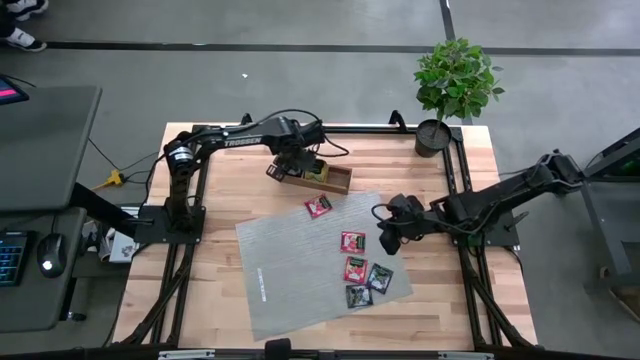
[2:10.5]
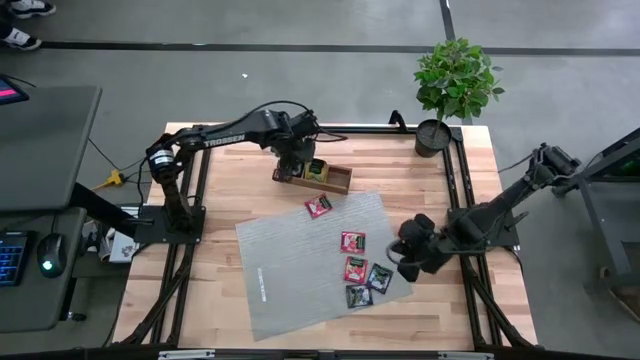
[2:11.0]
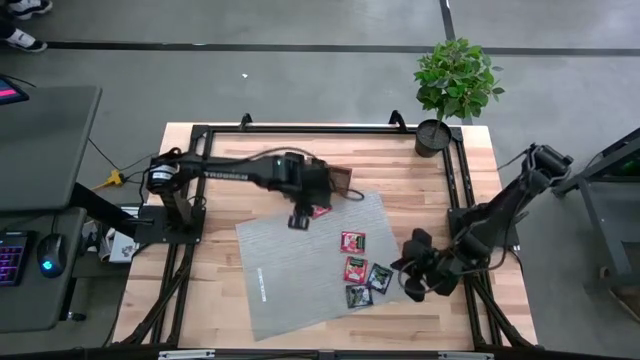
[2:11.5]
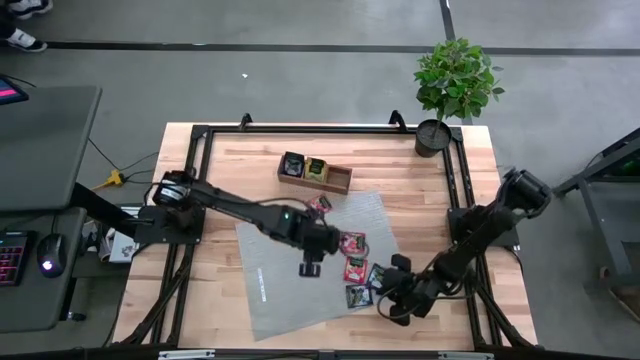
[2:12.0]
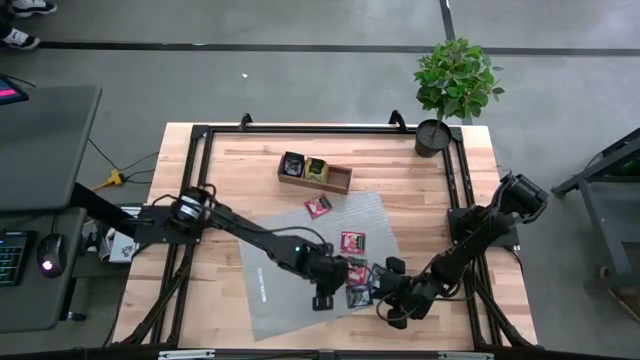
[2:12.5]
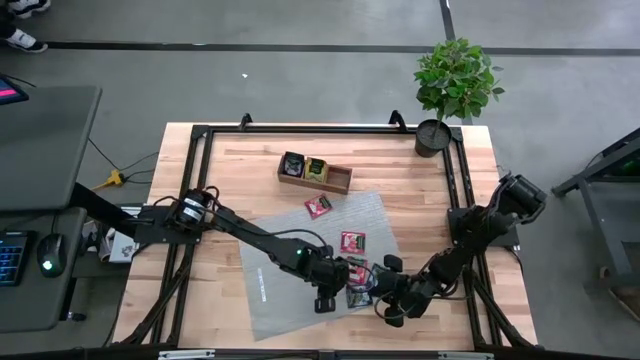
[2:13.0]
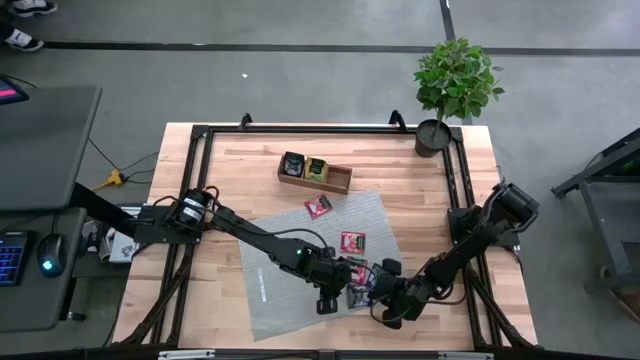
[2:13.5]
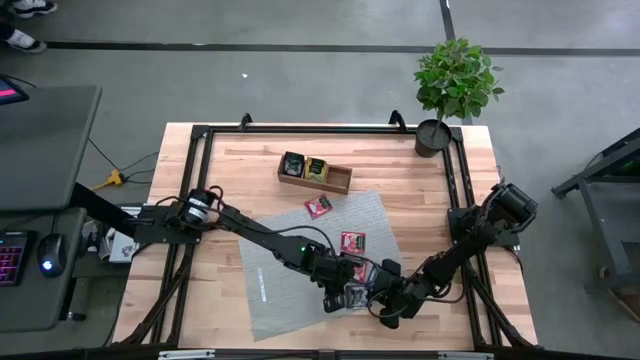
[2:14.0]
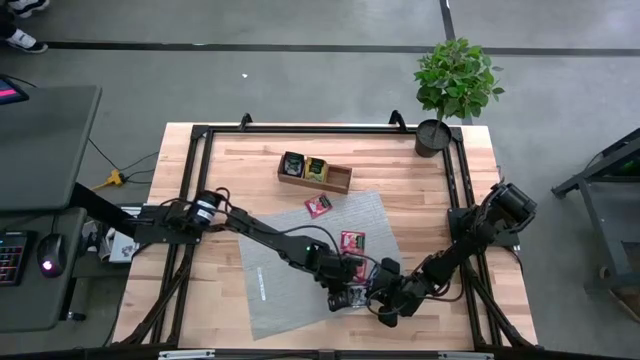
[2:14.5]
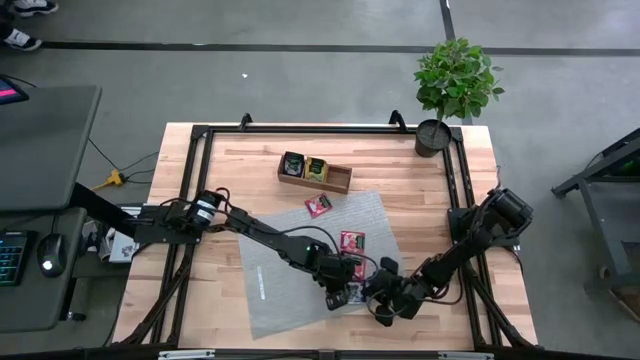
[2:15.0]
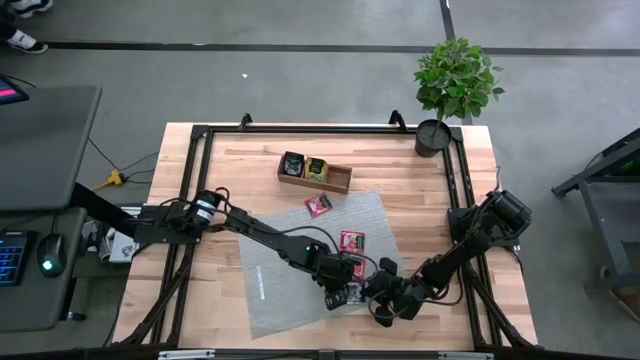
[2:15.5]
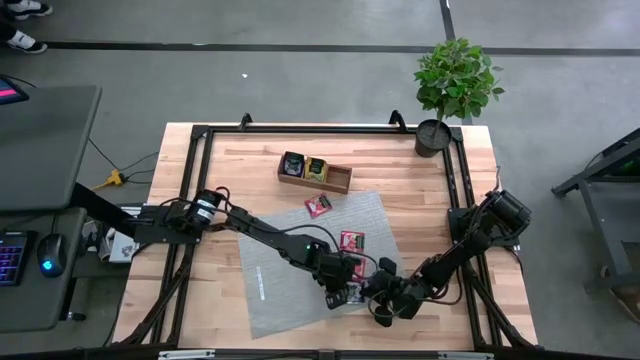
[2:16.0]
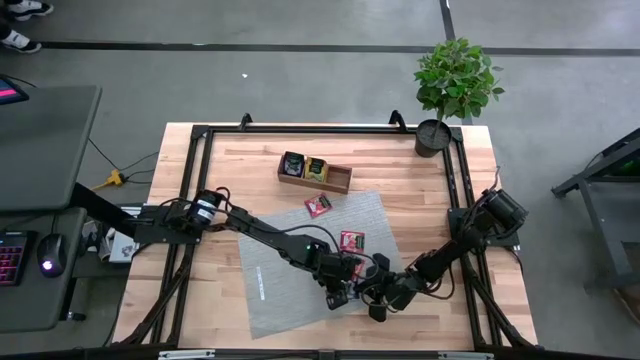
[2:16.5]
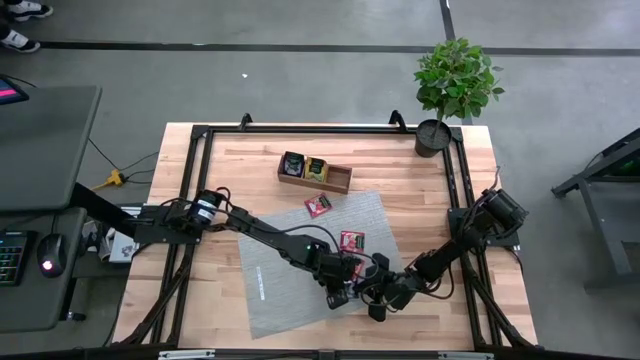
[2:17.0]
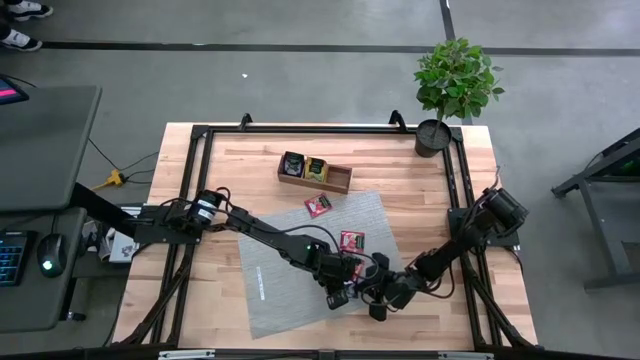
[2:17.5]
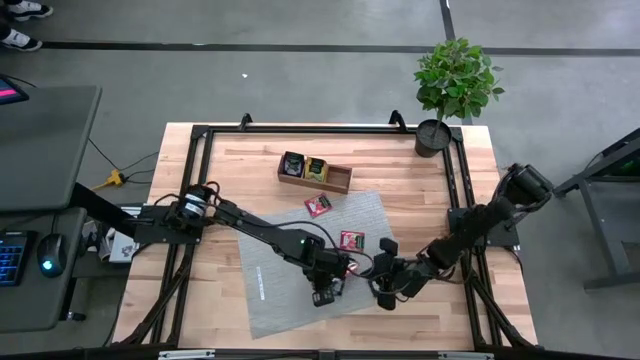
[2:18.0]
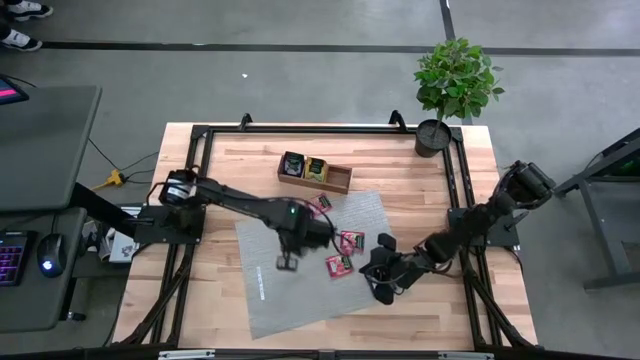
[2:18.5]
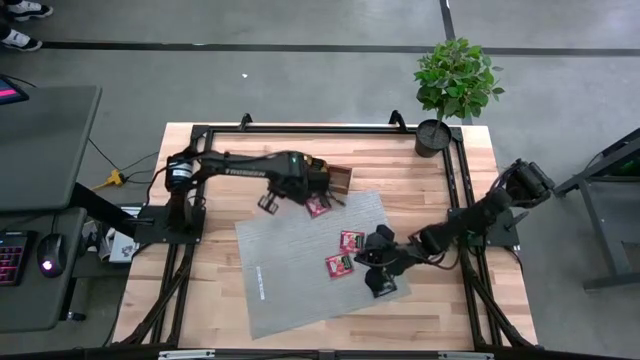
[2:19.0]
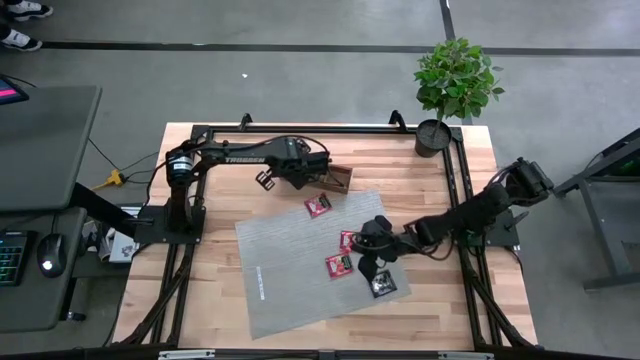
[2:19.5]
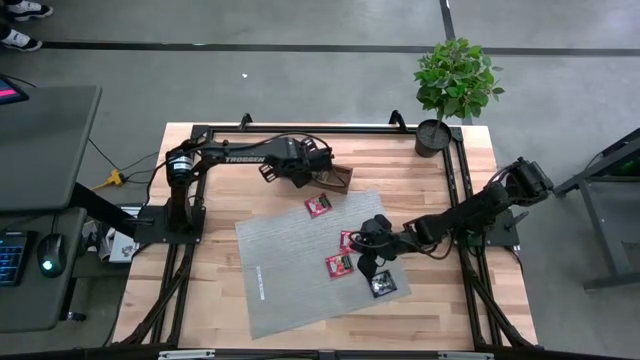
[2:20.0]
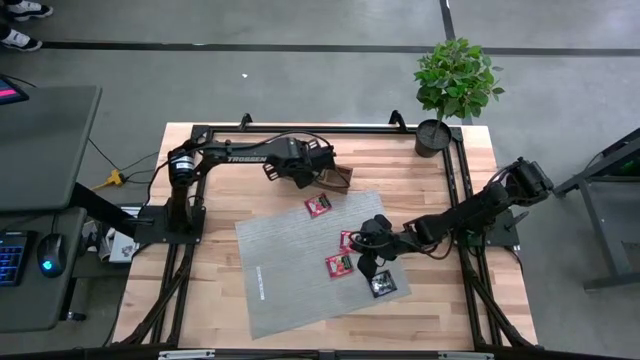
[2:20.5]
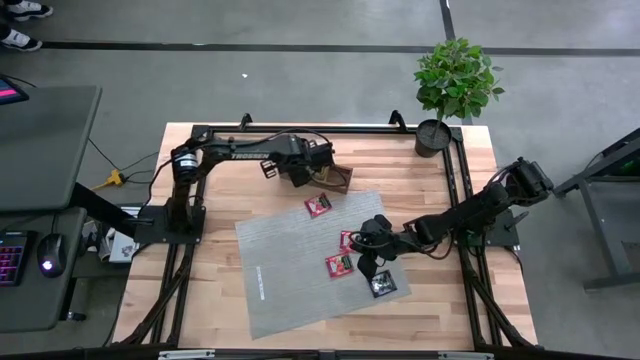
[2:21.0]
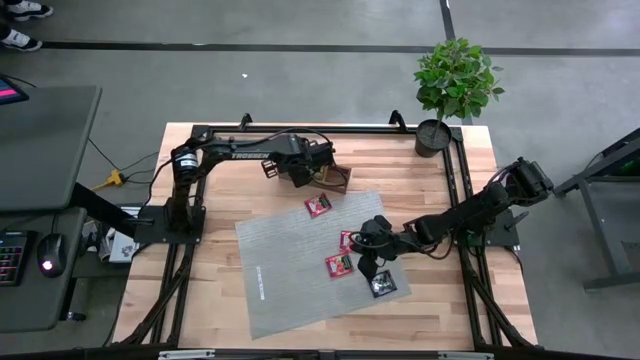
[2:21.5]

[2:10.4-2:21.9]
Task: Pick & Place Tea
Put the purple tea bag into the left section of the wooden organizer

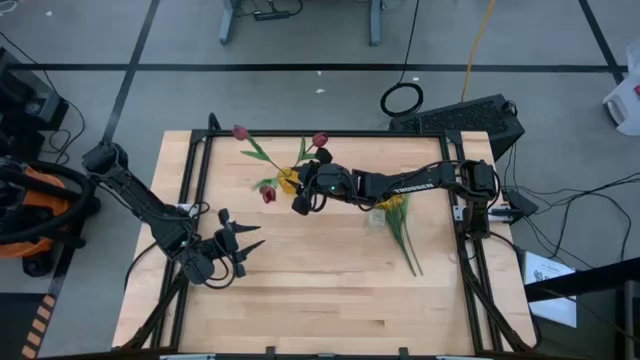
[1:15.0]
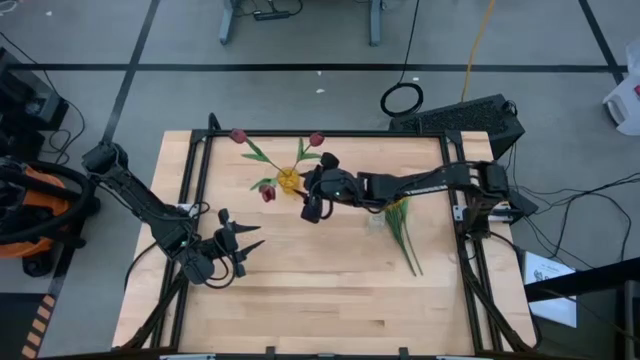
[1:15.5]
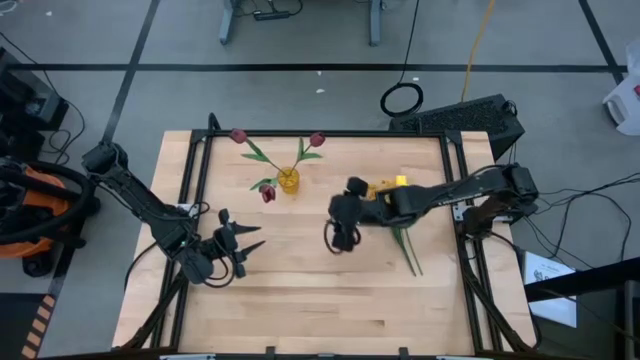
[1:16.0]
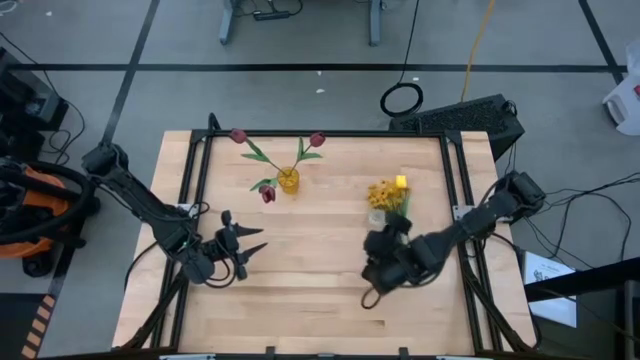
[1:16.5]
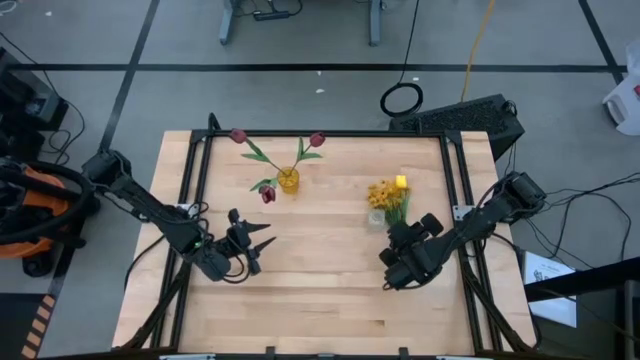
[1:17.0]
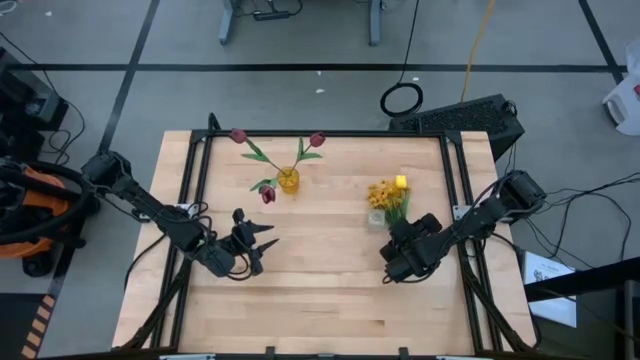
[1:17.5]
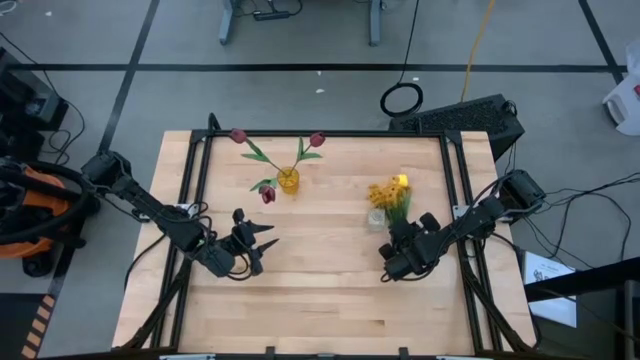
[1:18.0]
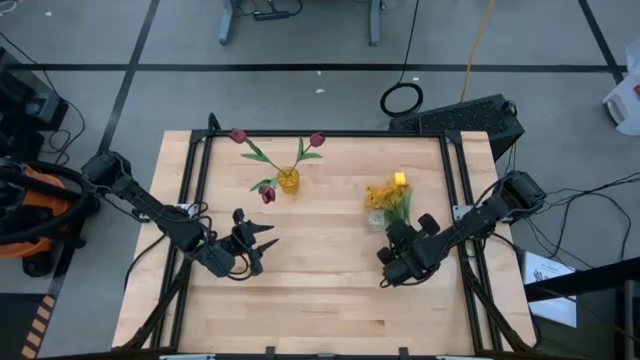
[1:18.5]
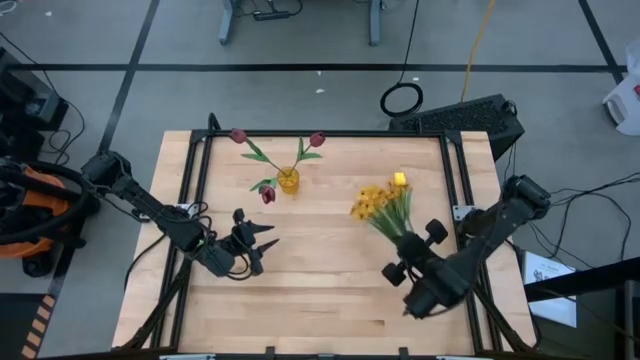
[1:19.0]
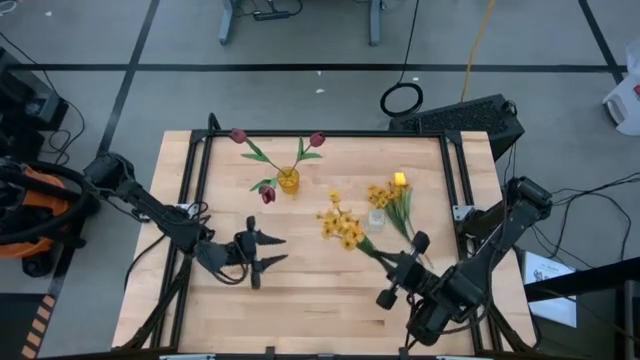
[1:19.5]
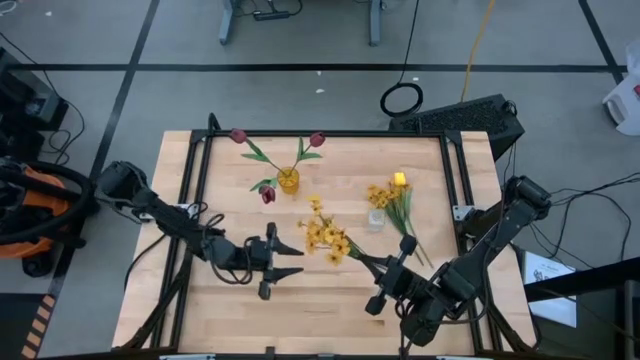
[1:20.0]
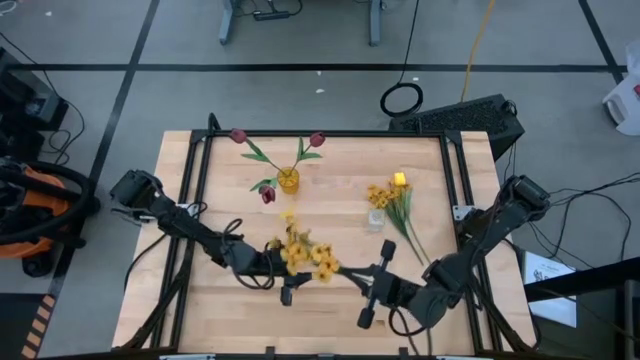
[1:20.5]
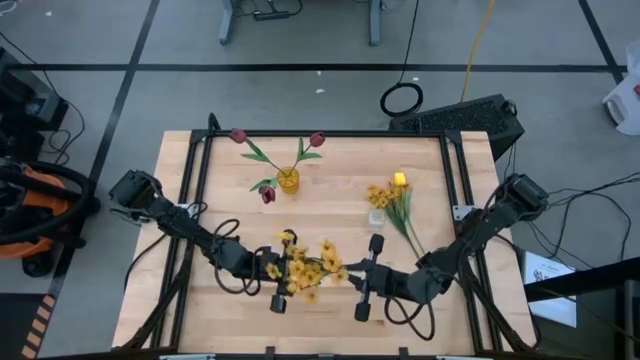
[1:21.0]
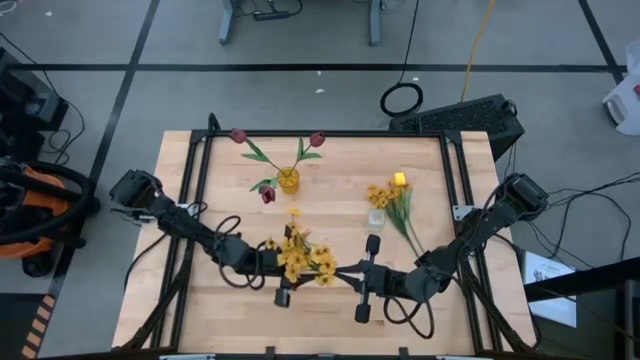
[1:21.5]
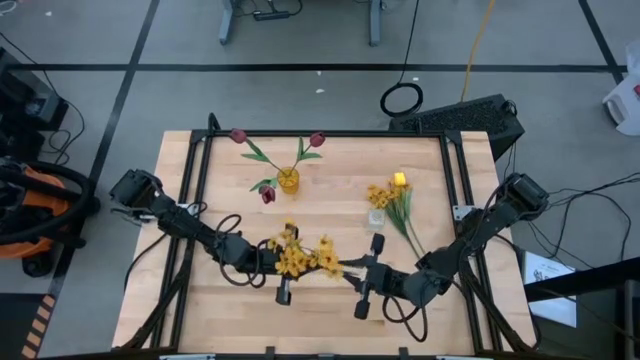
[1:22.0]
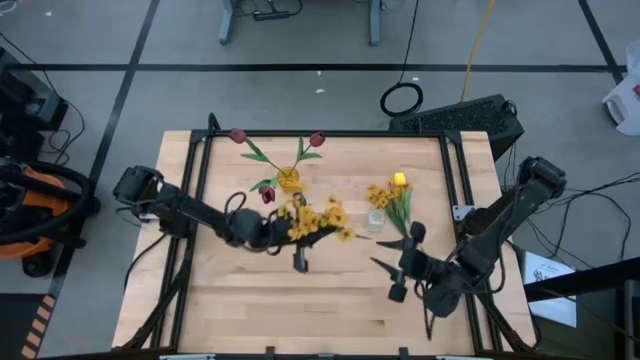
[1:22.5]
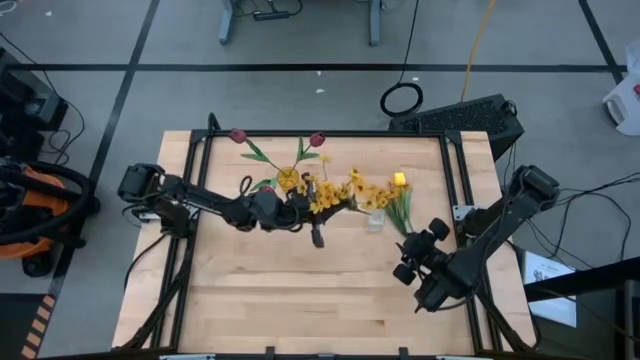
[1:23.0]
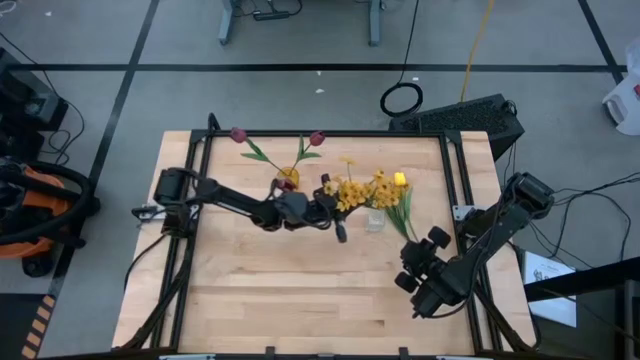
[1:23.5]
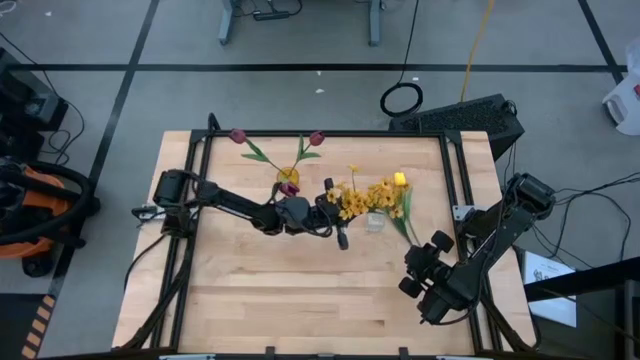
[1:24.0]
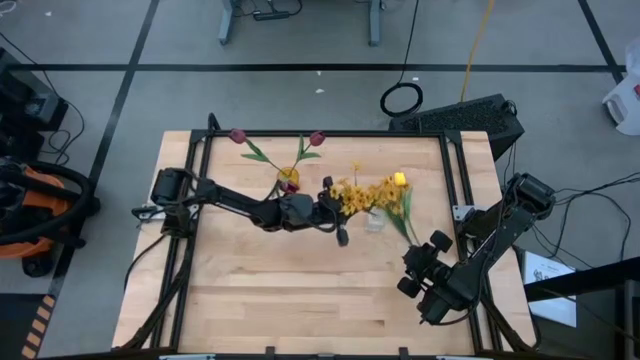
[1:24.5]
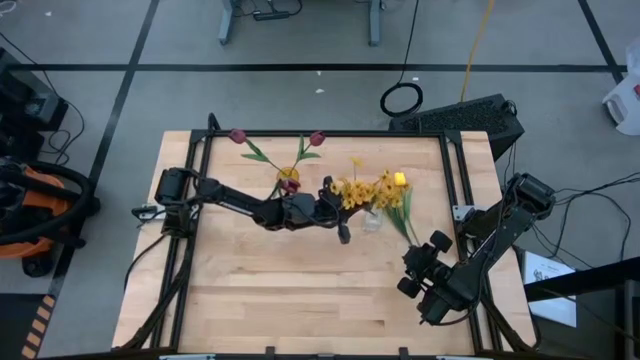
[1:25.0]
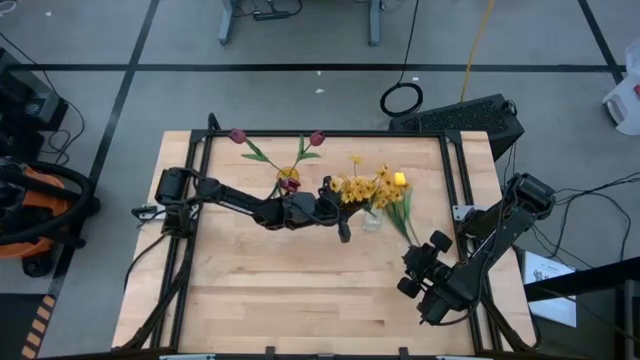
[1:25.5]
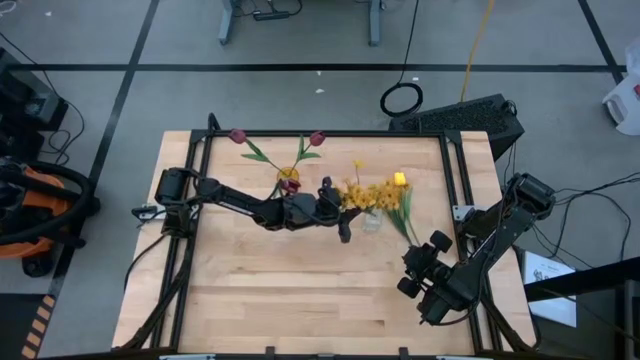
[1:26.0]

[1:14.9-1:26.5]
Task: Sort flowers into vase by color
Put the yellow flower into the transparent vase
